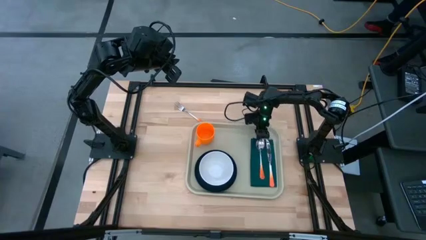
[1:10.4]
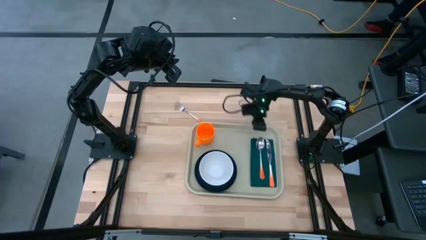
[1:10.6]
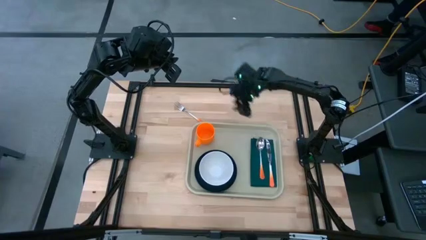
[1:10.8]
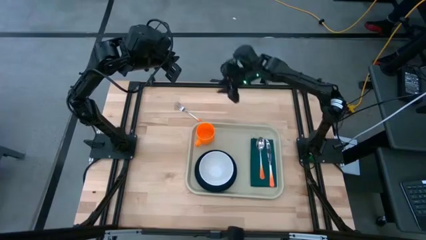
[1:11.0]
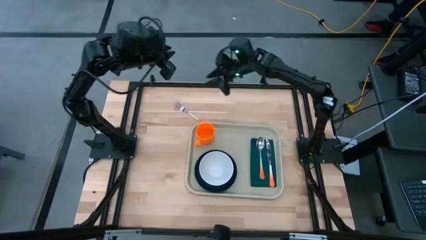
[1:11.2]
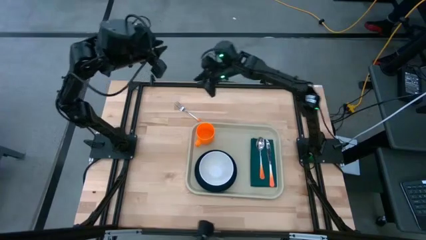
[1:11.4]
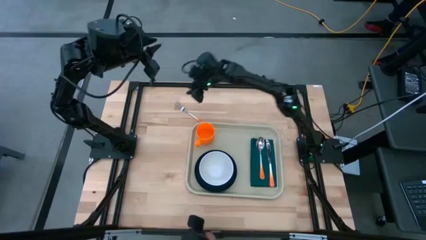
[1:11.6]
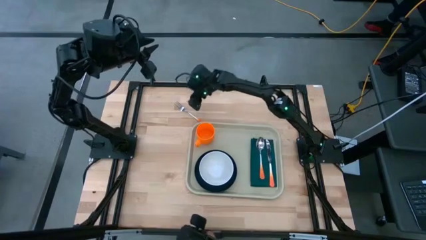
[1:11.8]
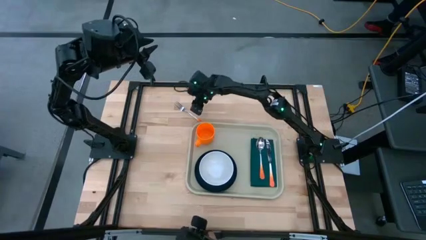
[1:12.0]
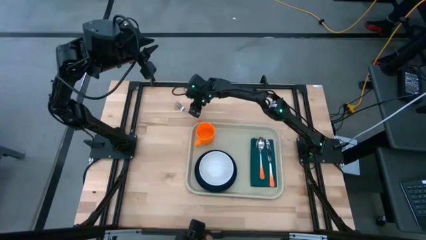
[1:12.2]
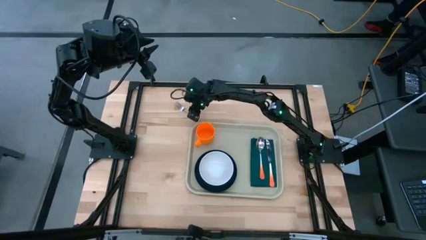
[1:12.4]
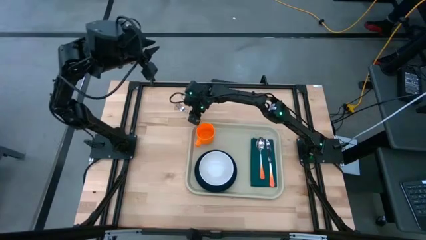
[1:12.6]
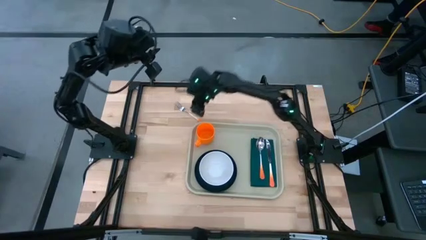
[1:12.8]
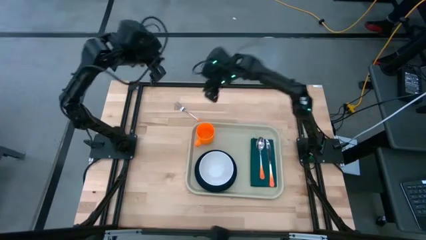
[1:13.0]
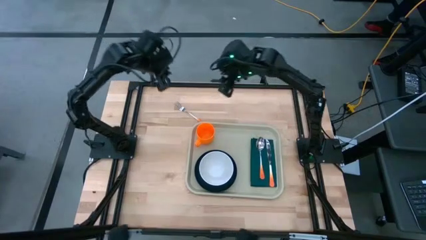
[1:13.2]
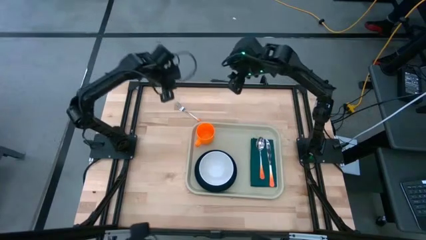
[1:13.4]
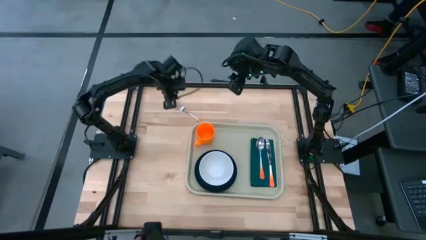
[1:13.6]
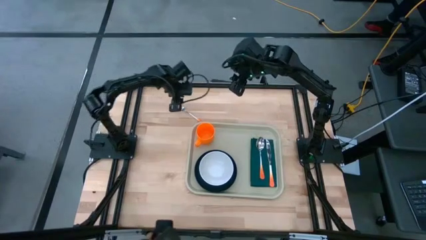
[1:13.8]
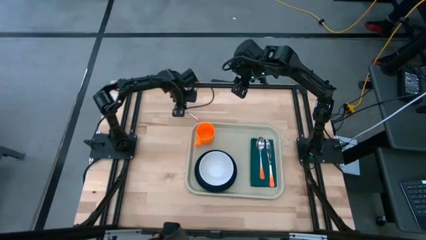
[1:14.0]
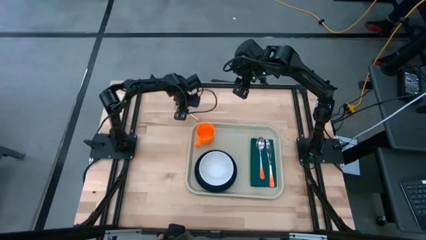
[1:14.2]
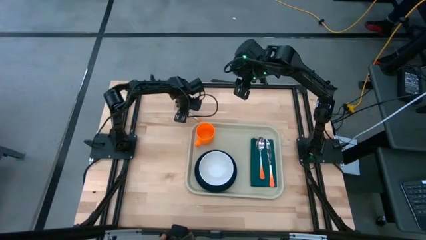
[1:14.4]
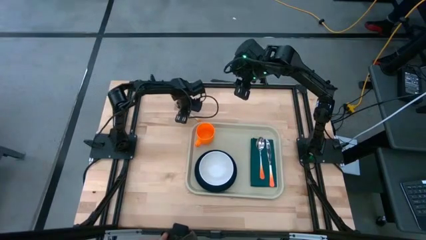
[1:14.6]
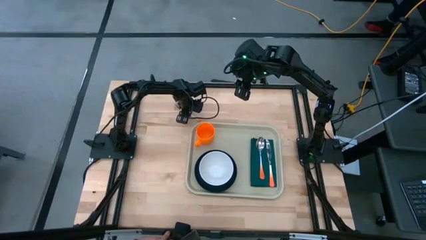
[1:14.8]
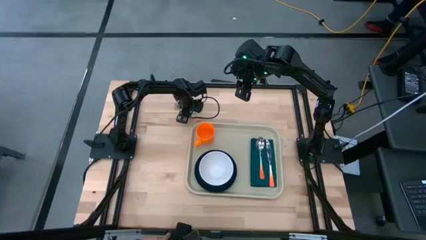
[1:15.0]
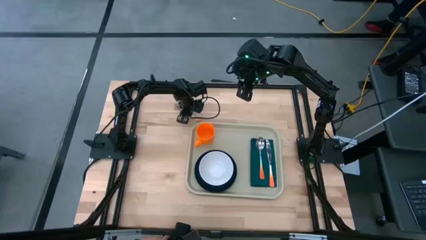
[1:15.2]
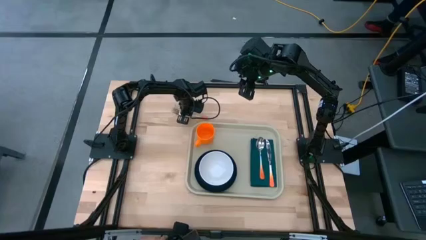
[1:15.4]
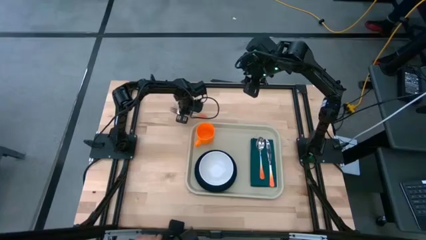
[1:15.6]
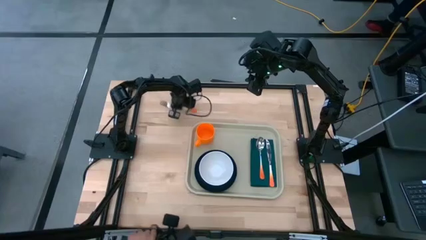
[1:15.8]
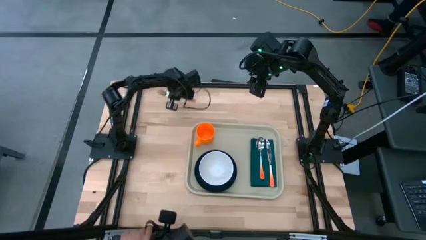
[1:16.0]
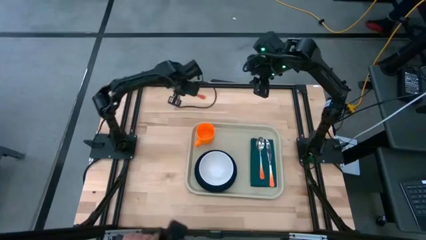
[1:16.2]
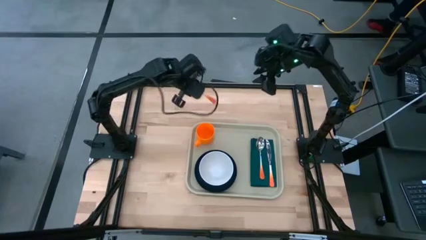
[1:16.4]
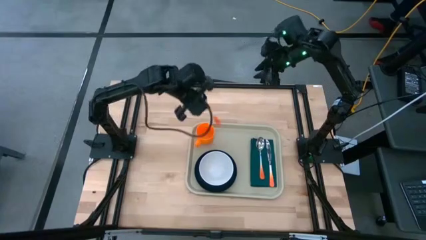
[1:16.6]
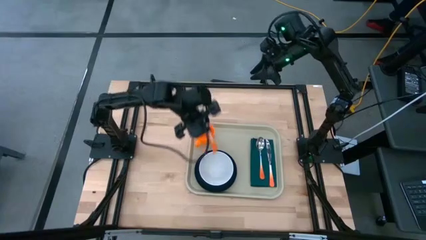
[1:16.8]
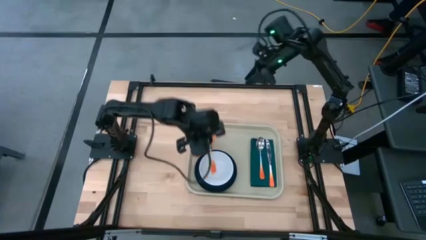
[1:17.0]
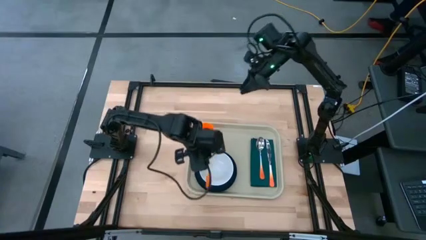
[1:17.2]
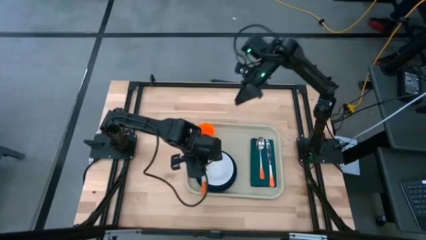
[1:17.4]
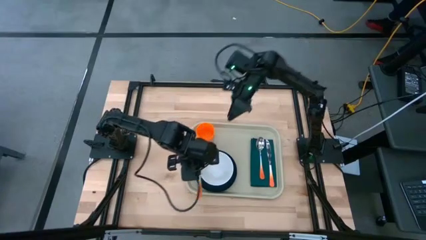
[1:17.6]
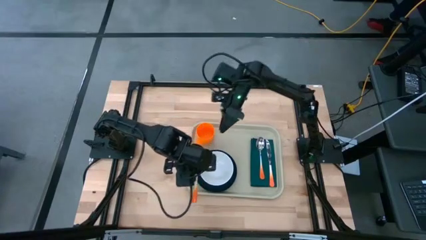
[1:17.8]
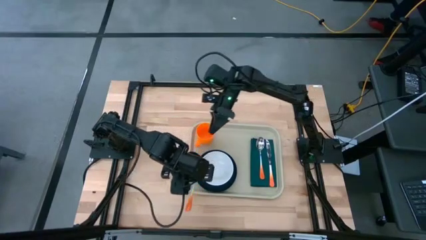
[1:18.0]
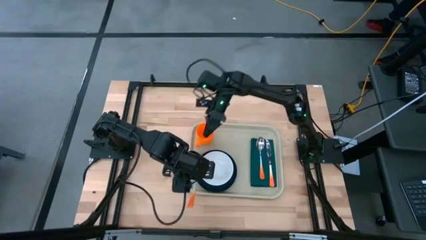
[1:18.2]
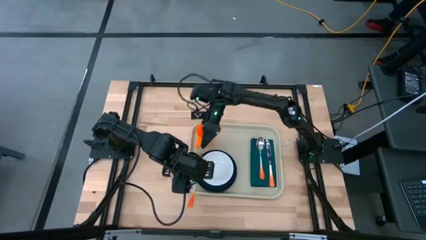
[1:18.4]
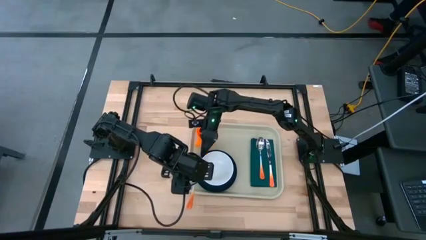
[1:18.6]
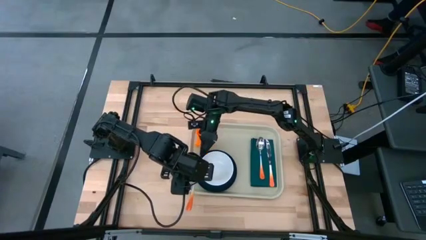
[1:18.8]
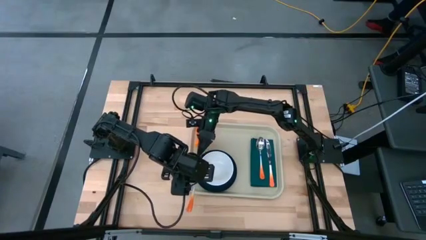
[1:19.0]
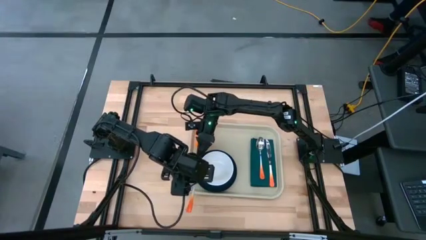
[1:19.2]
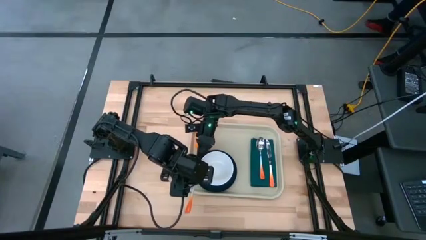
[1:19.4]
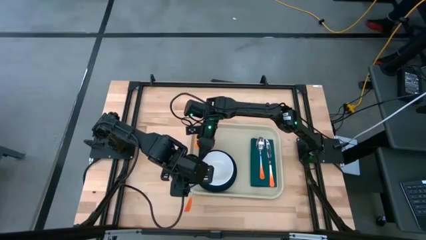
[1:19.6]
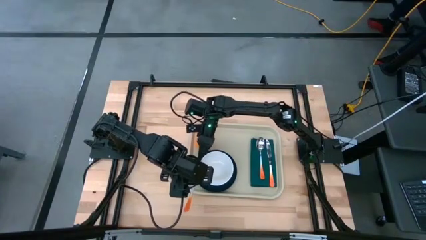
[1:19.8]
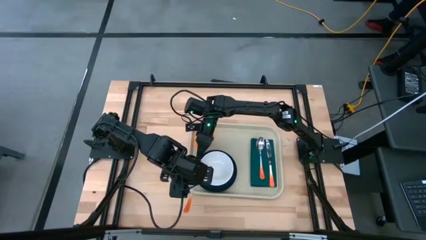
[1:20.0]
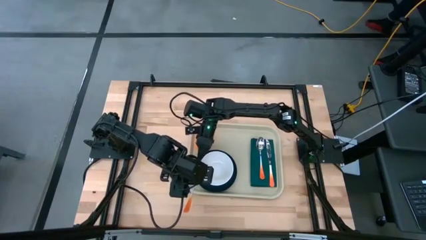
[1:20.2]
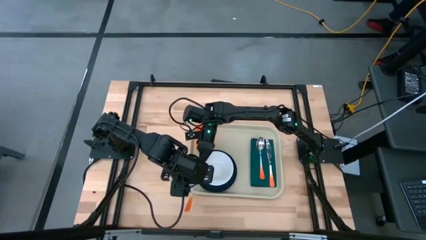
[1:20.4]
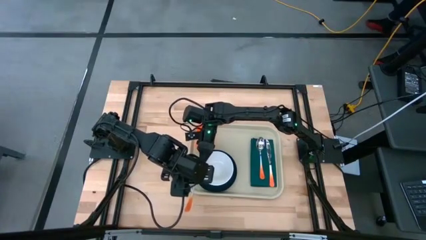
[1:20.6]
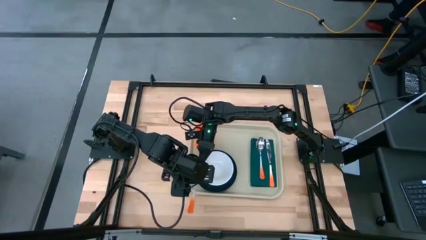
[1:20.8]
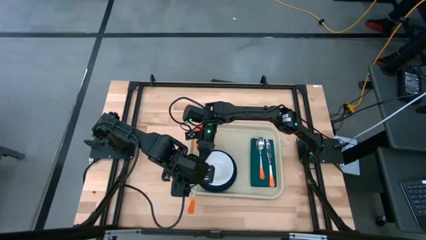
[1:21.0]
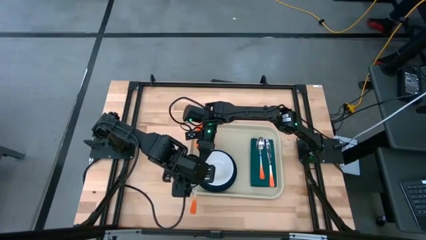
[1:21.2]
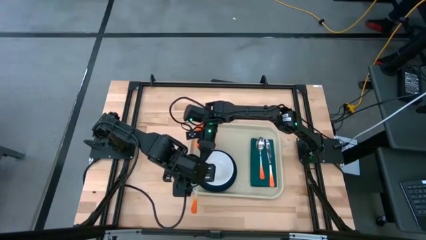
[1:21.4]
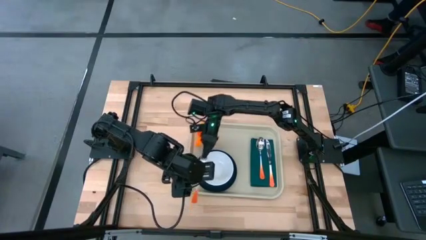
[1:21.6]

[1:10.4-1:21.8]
Task: Set up tray
Put the orange fork on the green napkin to the left of the orange spoon

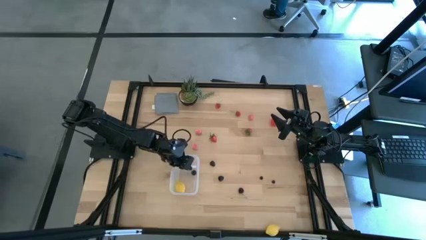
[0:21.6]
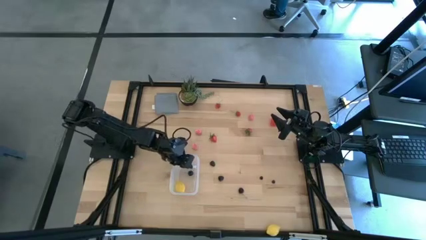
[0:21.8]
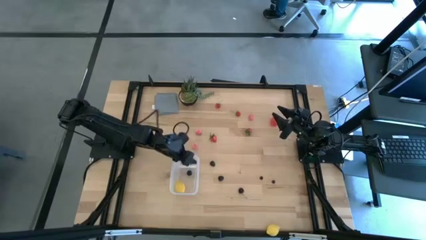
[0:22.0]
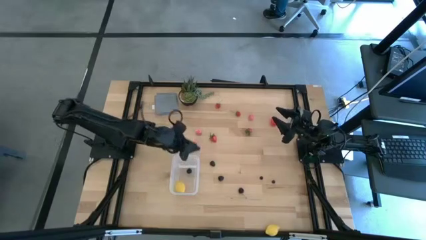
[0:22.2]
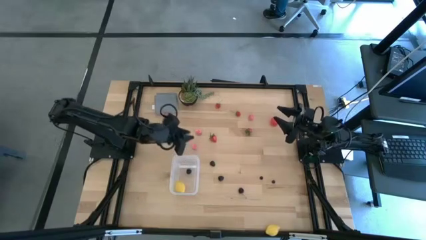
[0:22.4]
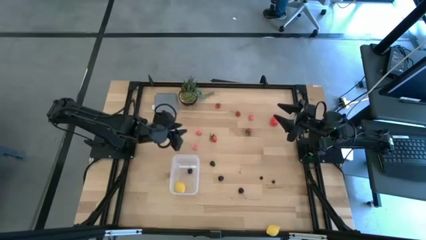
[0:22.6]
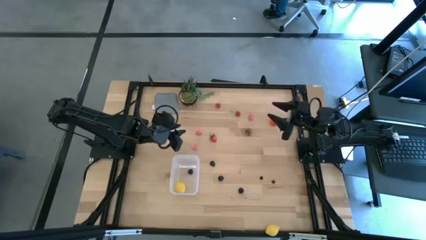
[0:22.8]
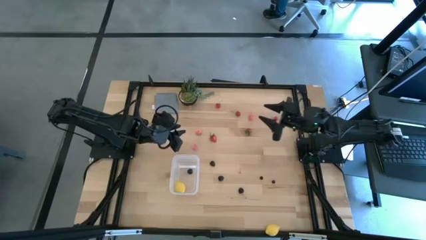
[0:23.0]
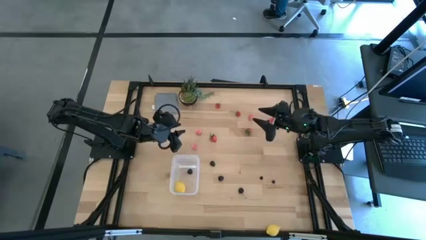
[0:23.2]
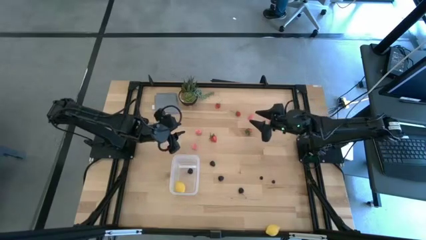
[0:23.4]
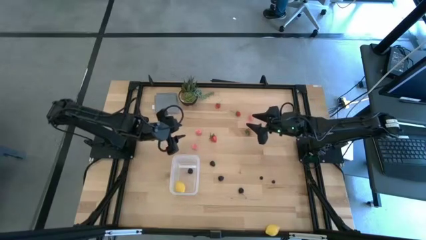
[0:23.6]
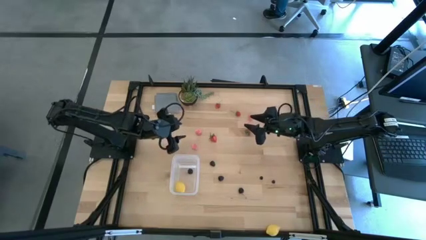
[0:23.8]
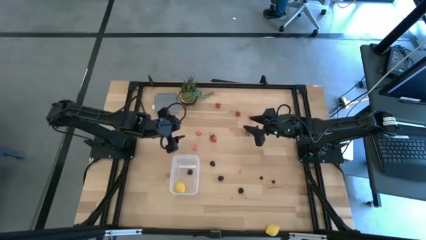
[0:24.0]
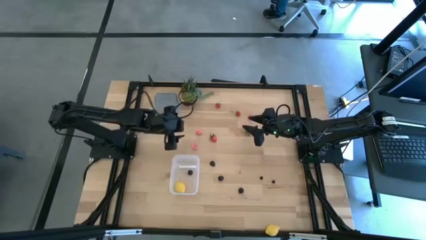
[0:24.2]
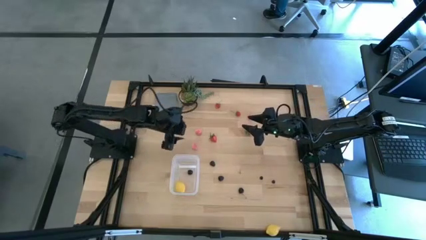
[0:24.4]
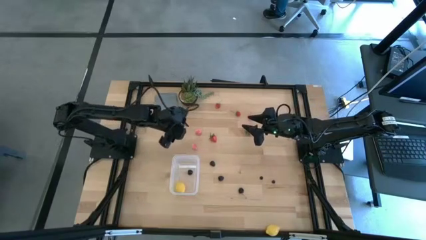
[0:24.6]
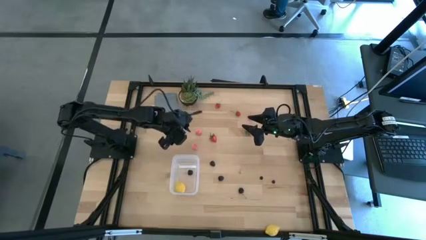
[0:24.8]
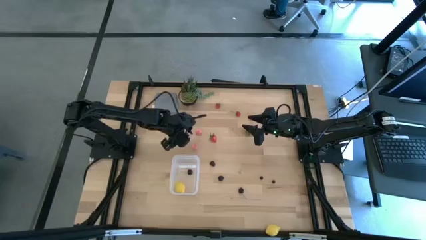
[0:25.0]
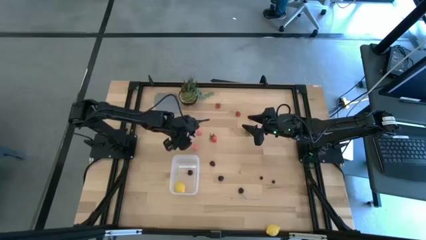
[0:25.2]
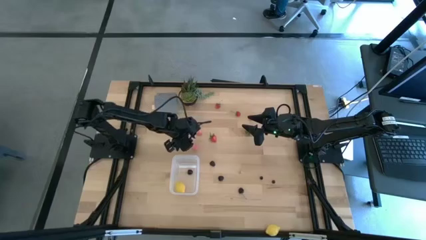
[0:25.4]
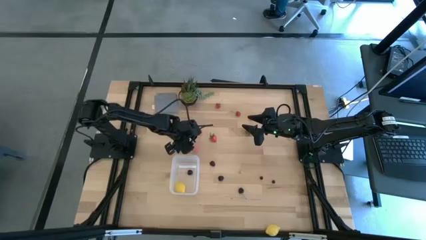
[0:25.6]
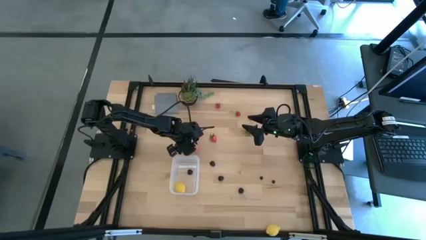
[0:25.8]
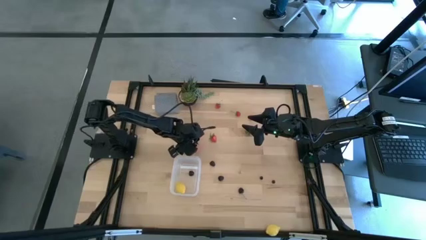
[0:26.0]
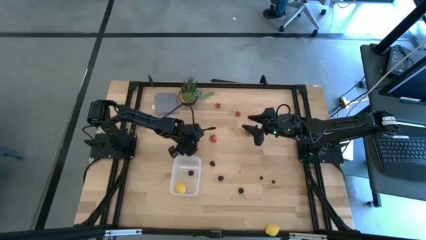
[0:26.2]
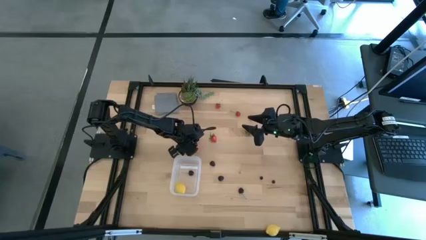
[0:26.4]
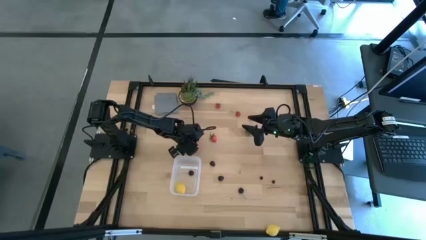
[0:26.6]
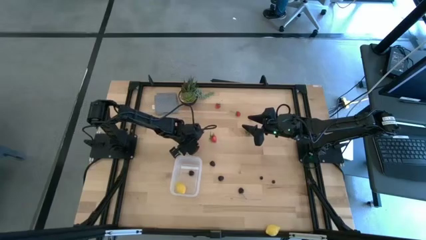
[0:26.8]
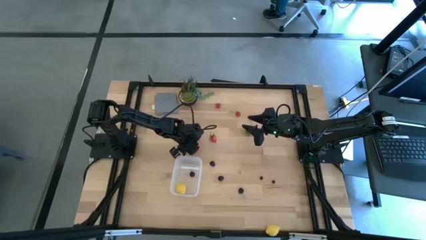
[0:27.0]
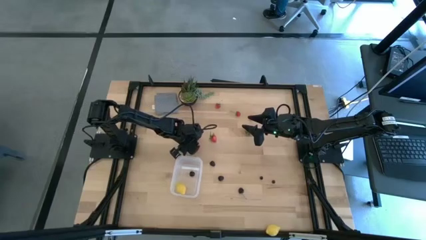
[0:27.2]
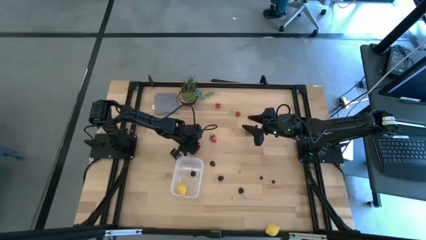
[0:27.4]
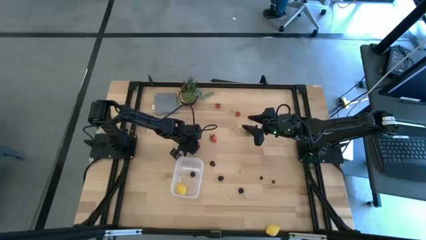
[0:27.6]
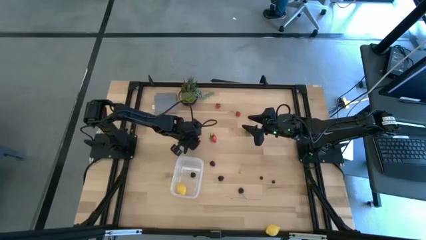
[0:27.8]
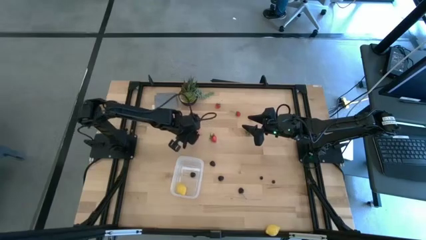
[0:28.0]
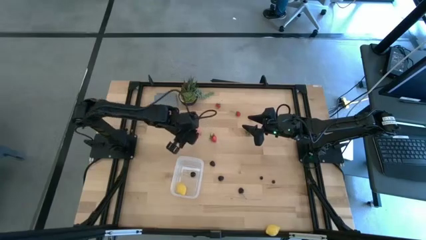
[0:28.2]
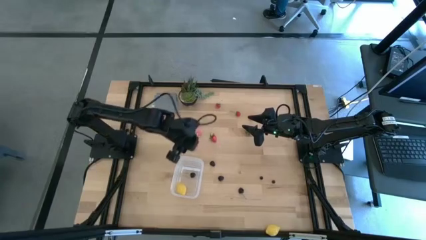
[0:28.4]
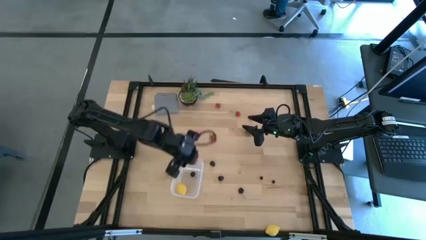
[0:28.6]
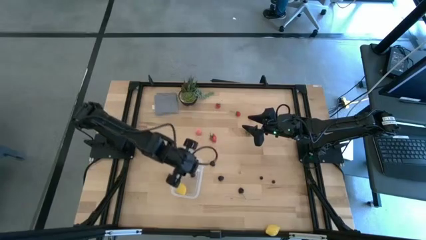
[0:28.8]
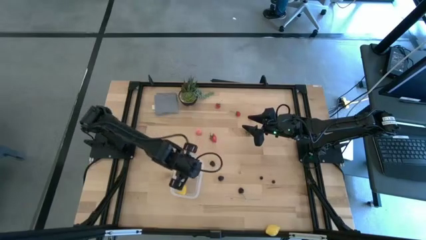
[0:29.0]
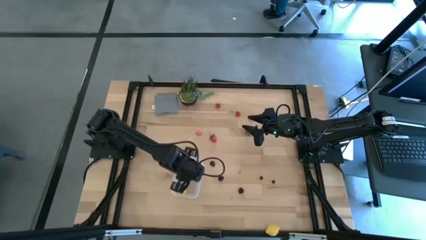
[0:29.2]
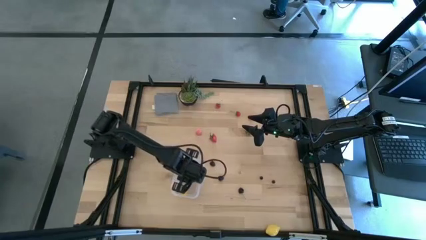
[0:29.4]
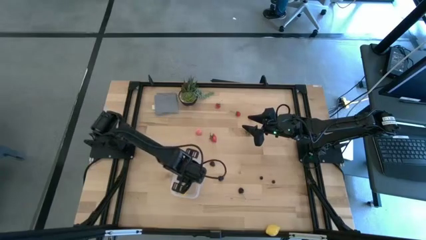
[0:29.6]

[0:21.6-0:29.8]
Task: Pick and placing Produce into tupperware
Put the pink peach into the transparent bin
